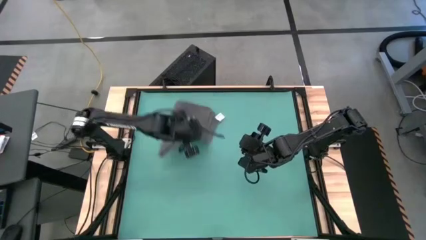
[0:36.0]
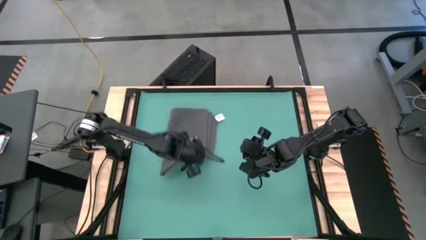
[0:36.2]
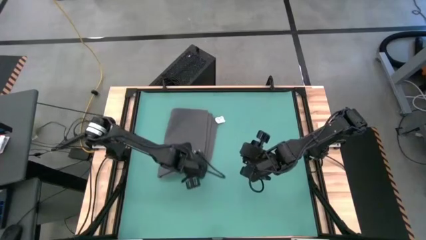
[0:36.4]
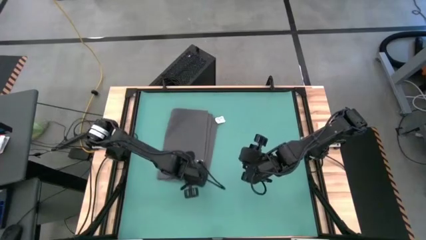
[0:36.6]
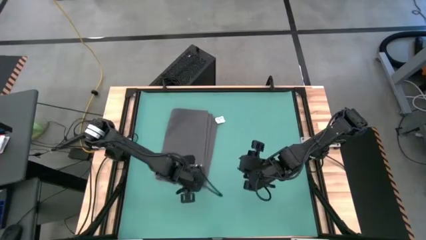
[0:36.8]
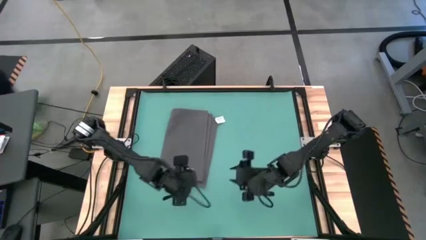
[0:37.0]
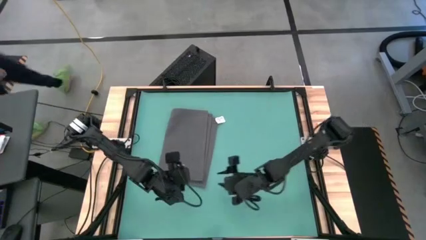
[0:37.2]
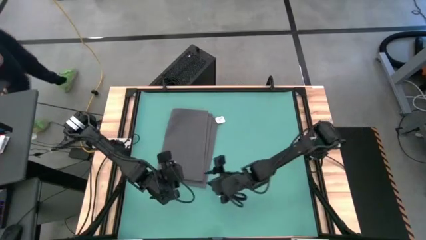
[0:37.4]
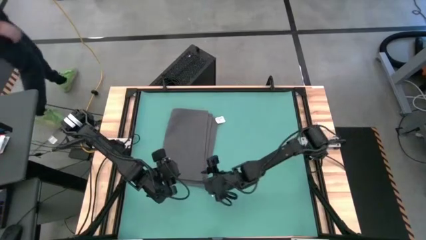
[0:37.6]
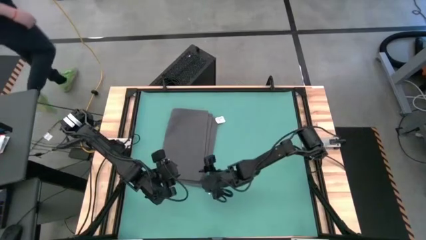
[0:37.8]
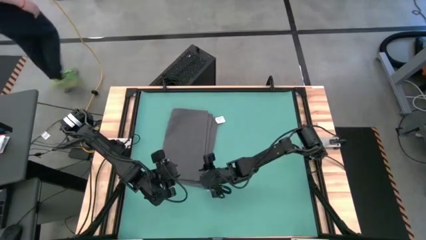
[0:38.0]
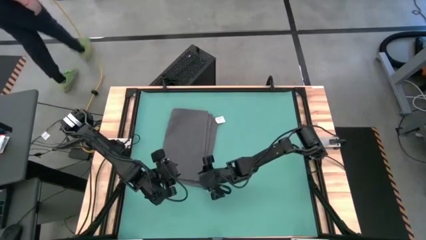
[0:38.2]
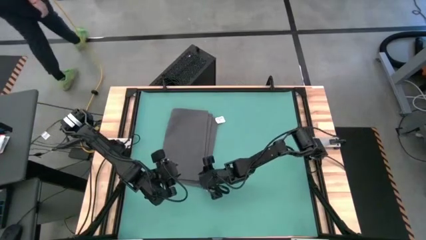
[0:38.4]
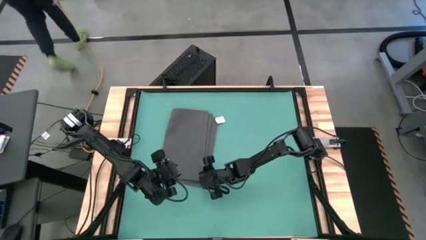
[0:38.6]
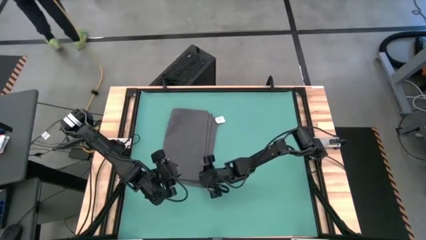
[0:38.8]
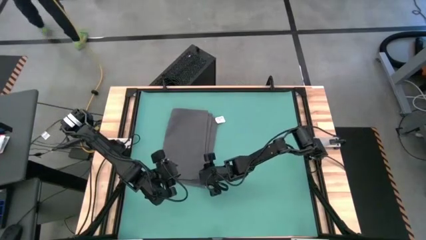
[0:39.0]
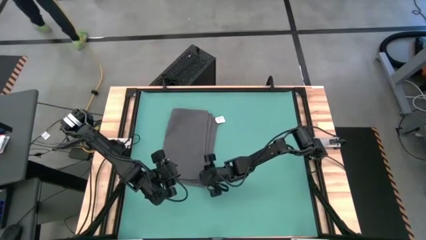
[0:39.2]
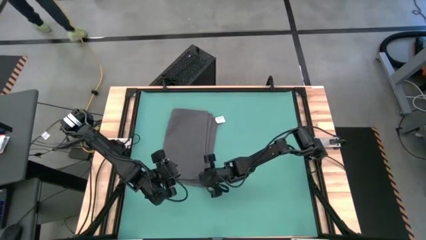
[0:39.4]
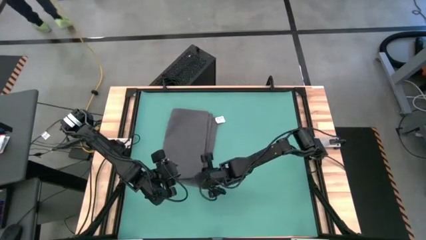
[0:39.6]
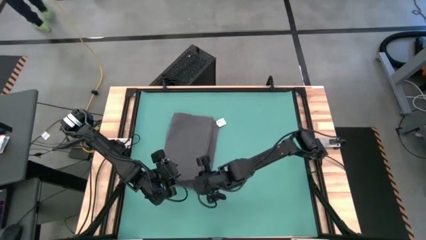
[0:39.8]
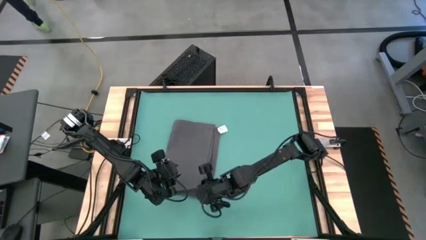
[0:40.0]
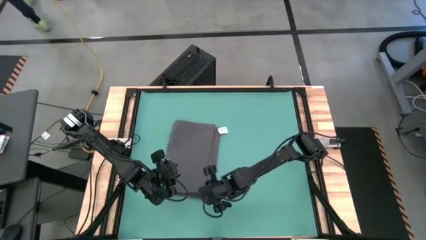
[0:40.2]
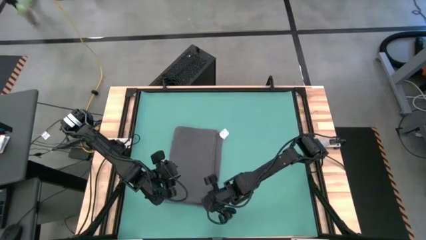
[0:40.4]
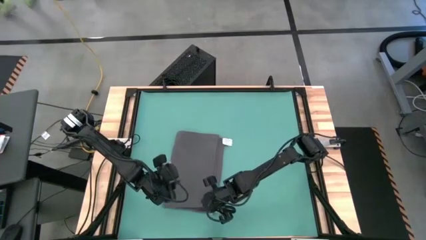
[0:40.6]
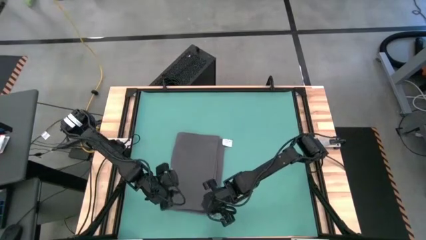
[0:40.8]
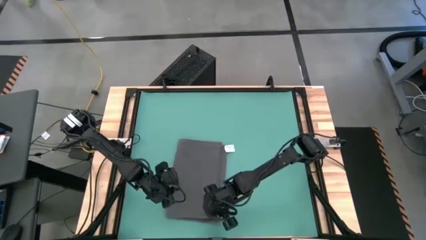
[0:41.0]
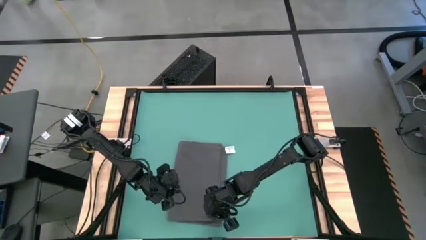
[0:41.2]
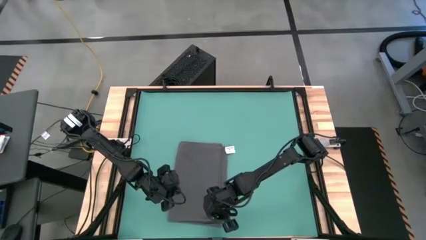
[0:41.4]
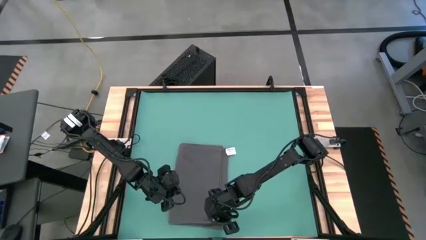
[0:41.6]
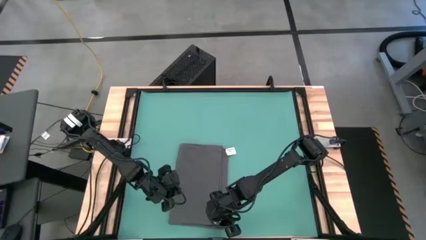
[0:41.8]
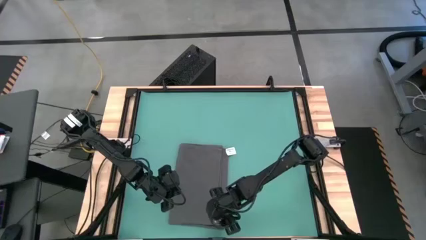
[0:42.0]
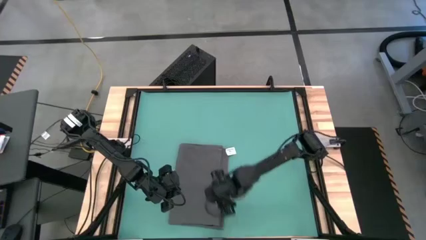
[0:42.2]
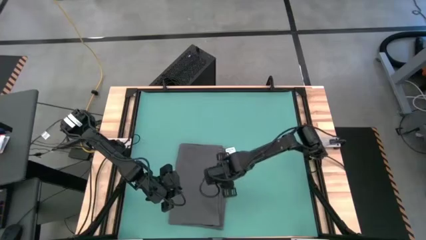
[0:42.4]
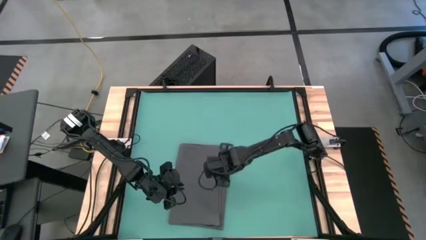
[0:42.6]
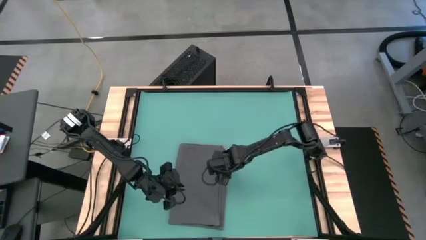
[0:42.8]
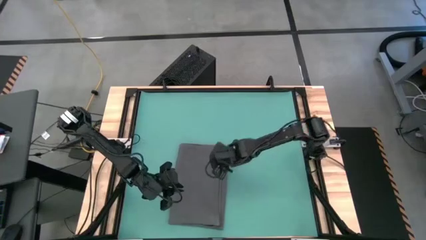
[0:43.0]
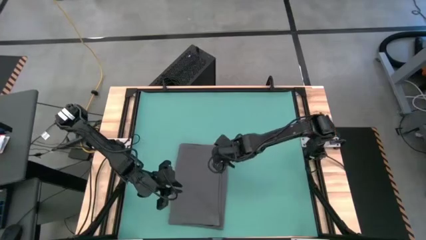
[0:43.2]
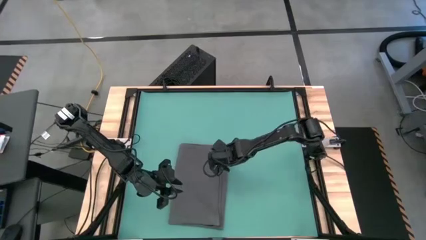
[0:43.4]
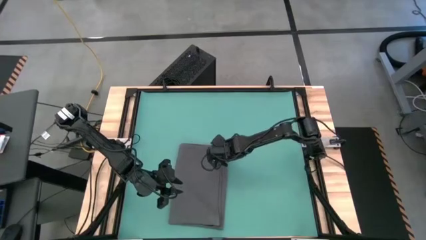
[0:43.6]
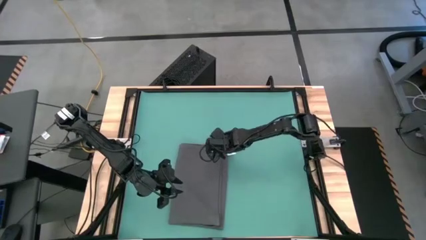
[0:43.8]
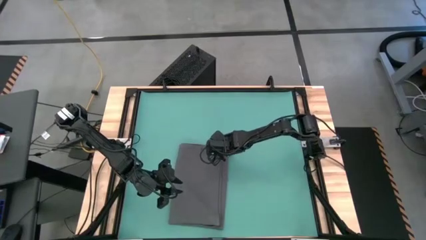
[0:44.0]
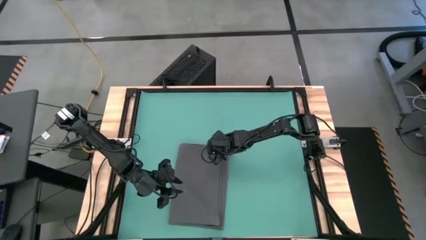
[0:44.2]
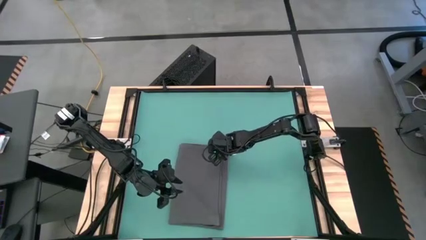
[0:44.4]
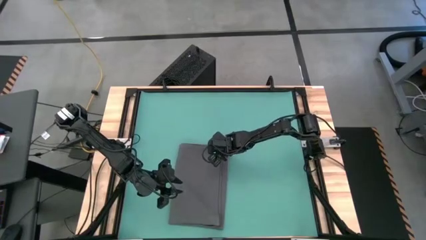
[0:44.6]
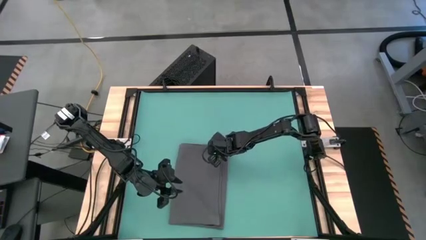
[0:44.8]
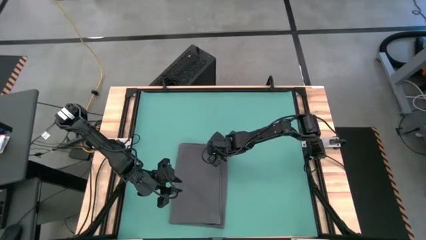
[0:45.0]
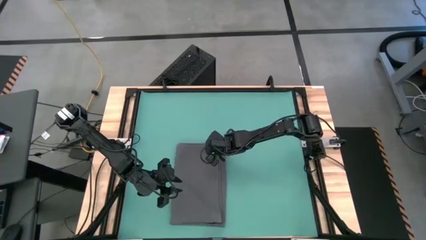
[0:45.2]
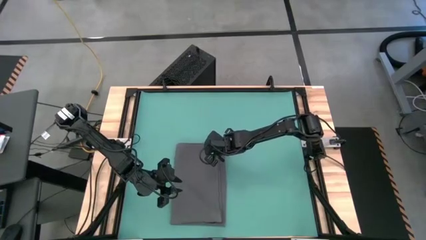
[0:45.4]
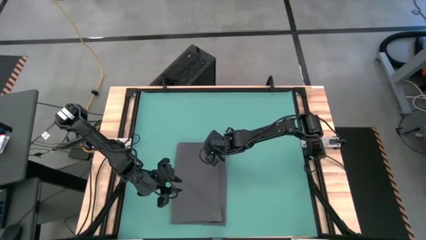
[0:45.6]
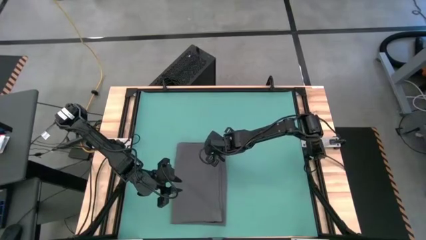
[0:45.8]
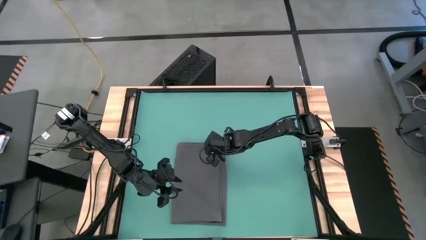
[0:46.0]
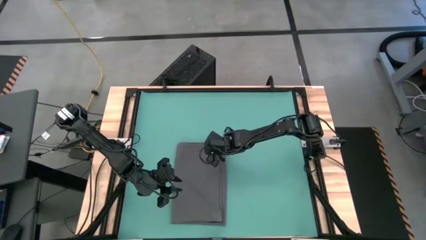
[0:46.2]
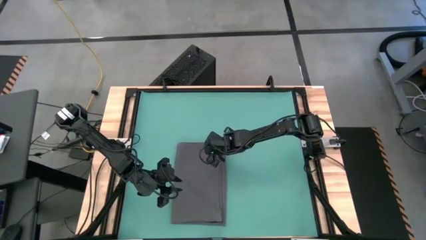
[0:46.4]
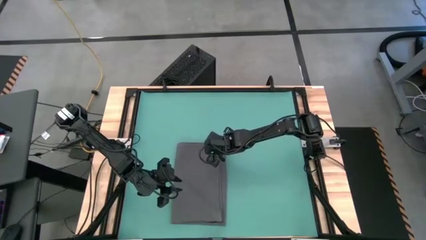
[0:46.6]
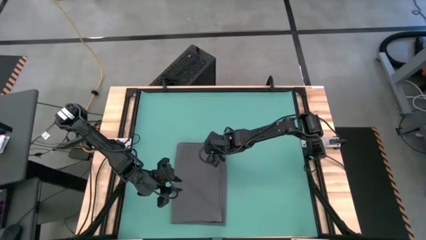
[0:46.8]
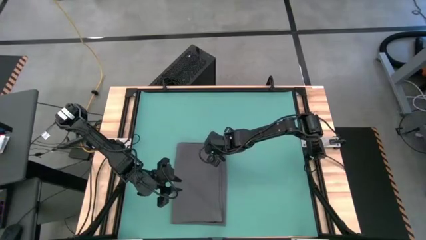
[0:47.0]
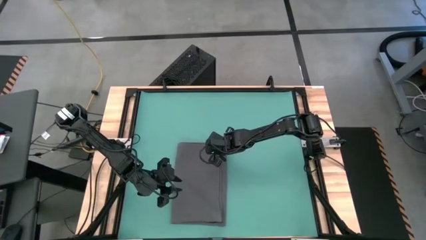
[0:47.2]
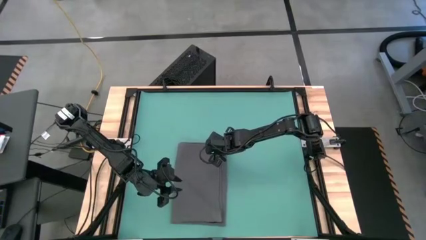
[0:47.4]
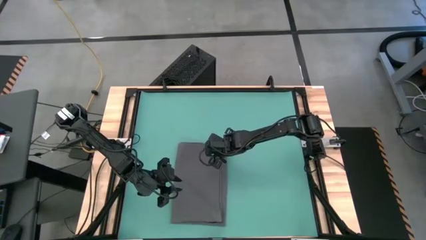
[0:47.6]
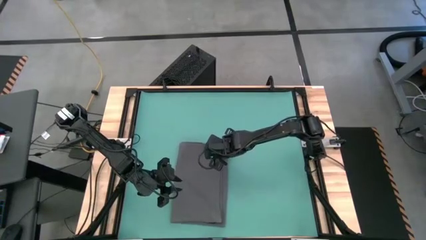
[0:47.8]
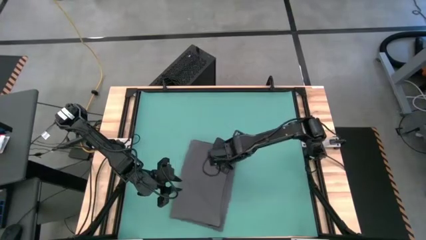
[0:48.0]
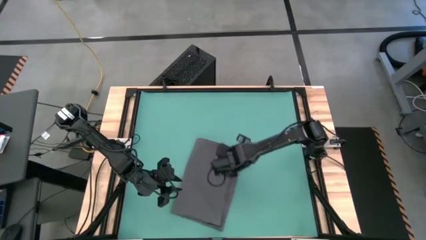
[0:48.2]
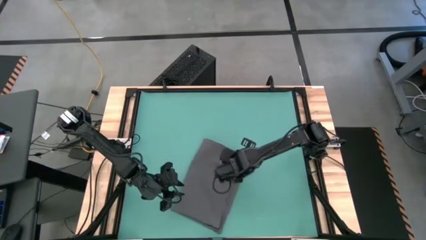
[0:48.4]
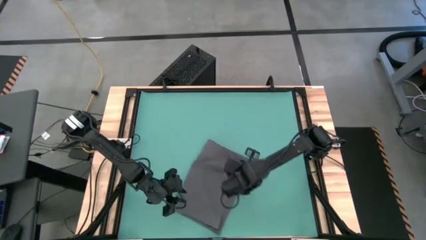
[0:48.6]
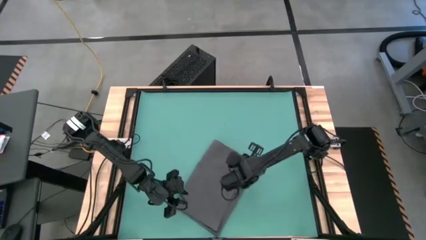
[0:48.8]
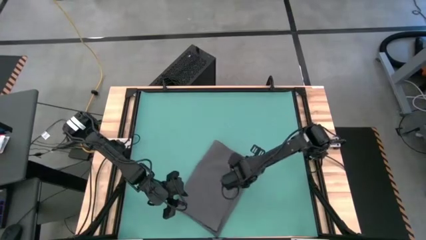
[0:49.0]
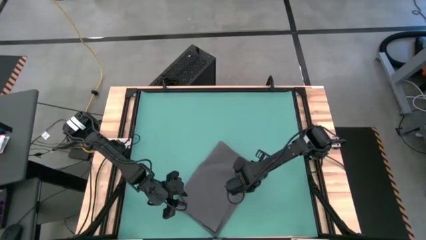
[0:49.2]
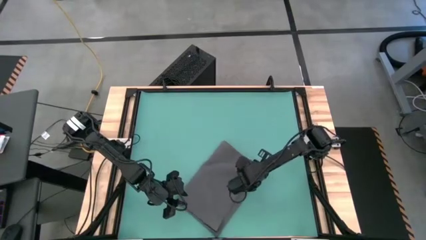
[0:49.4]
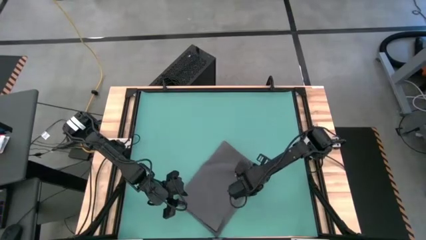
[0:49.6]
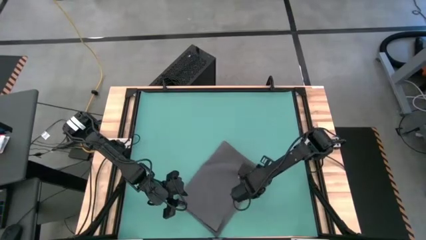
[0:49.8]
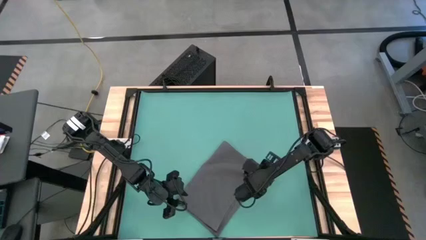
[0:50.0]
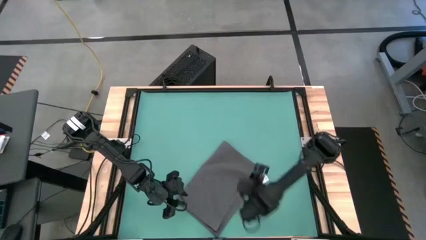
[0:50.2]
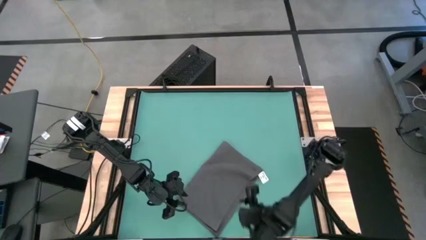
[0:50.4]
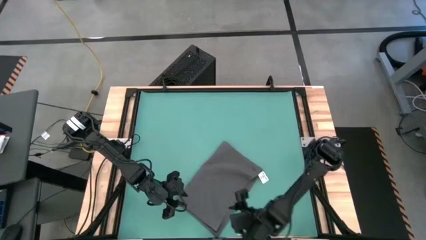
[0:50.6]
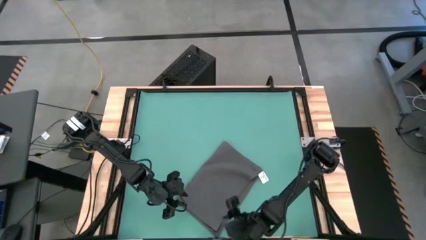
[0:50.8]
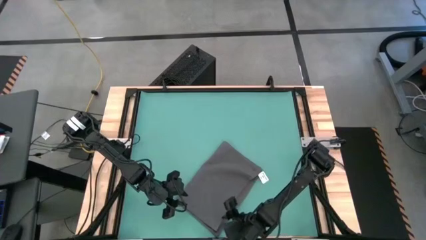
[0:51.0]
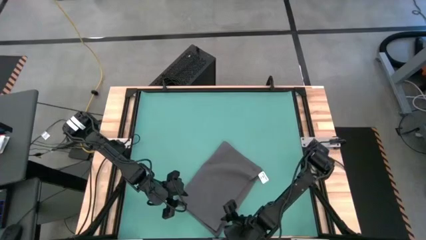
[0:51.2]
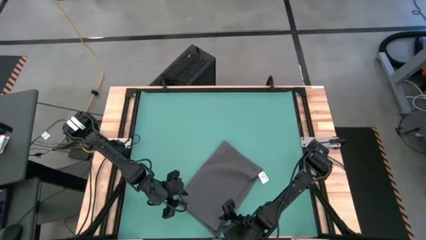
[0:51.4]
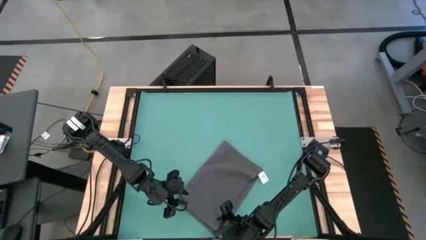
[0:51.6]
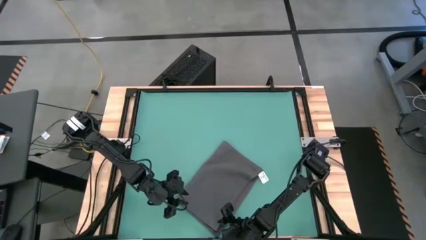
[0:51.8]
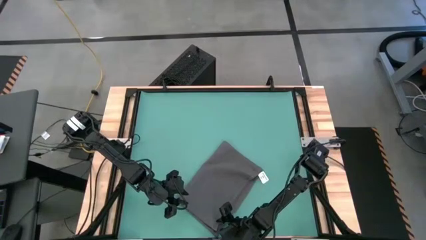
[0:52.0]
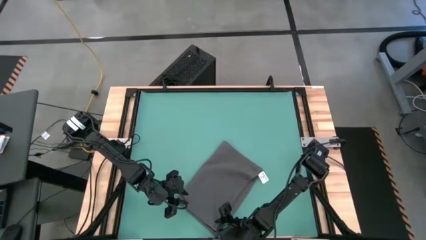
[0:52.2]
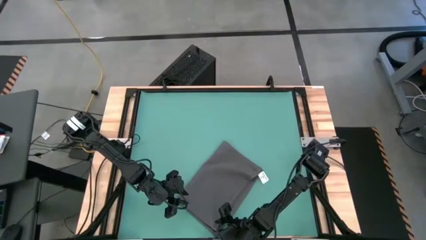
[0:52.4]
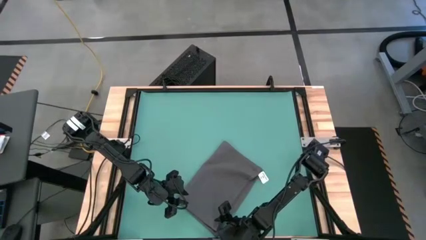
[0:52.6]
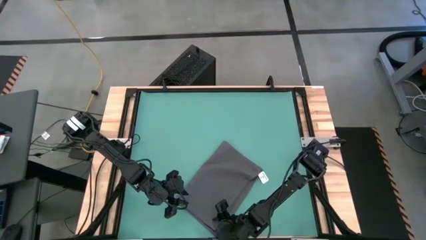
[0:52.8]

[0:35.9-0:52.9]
Task: Roll towel into tight, uniform cylinder
Roll the gray towel
